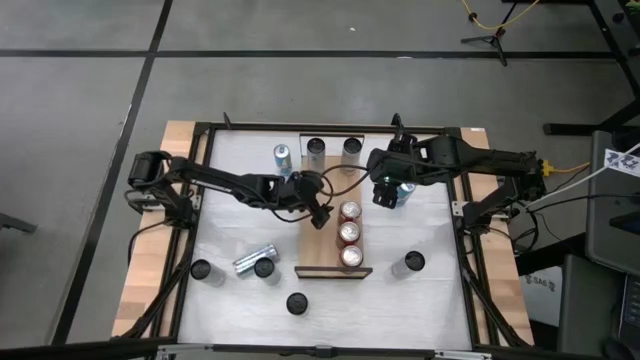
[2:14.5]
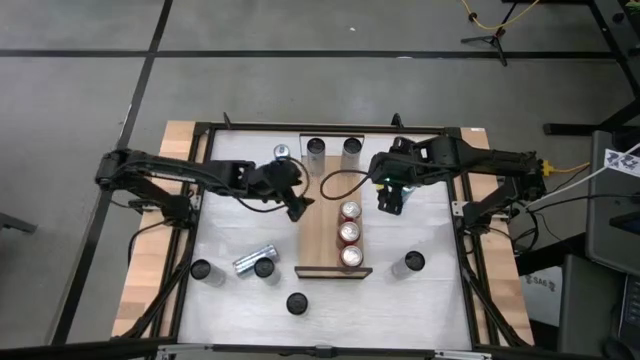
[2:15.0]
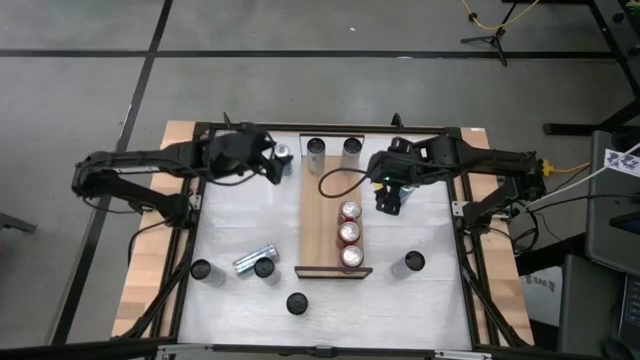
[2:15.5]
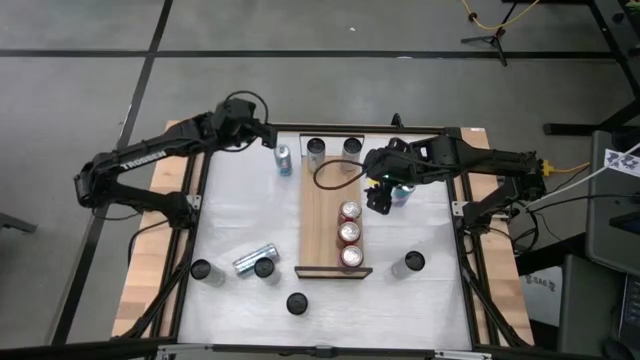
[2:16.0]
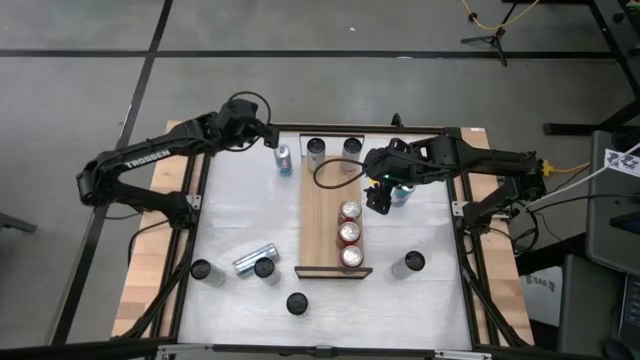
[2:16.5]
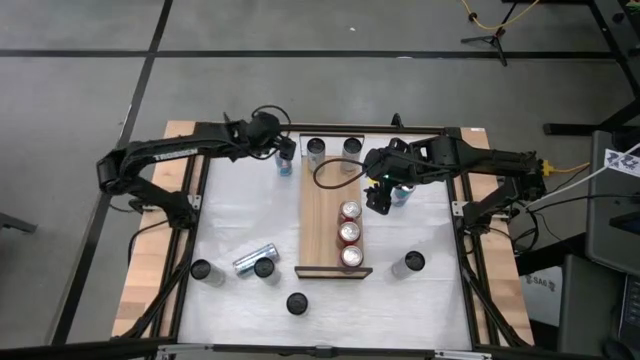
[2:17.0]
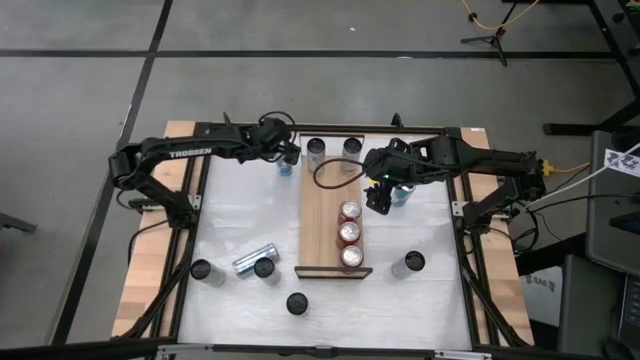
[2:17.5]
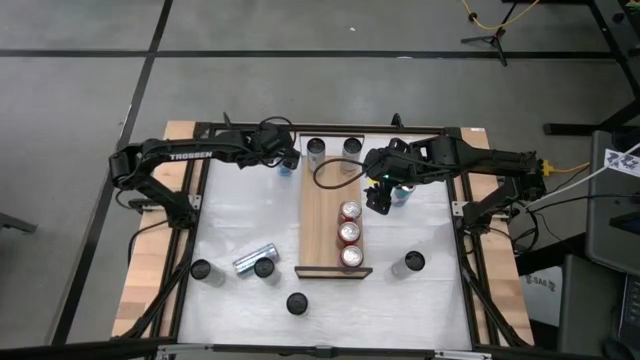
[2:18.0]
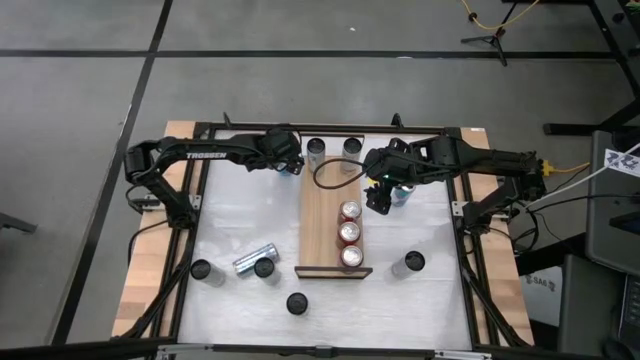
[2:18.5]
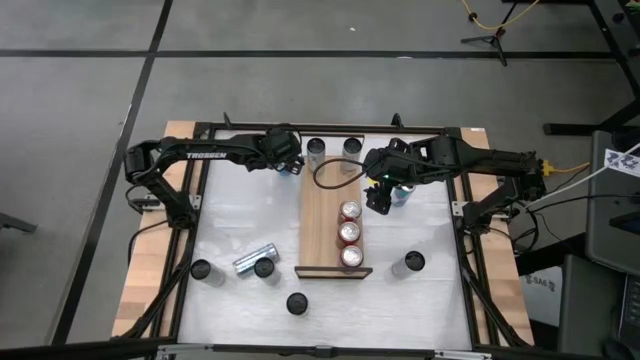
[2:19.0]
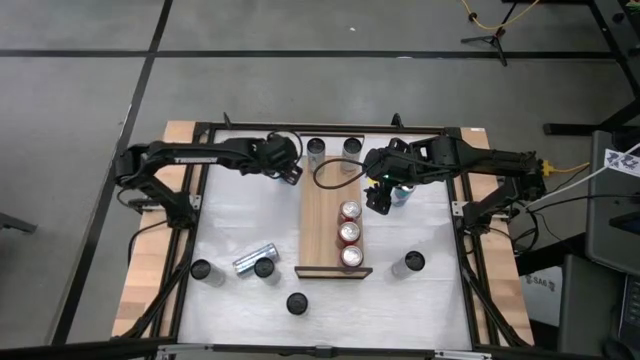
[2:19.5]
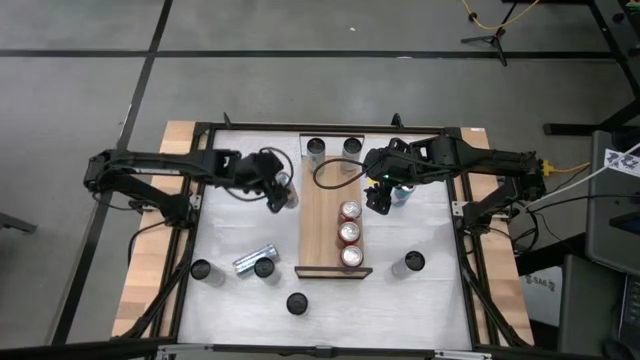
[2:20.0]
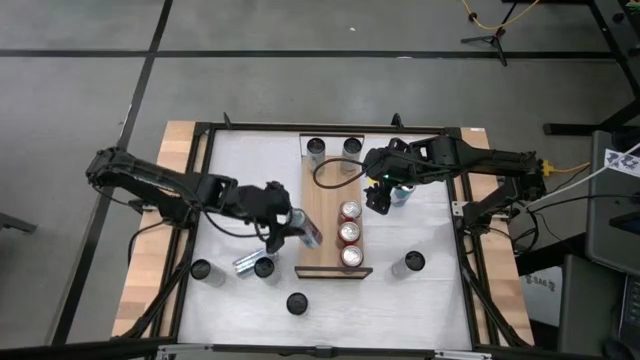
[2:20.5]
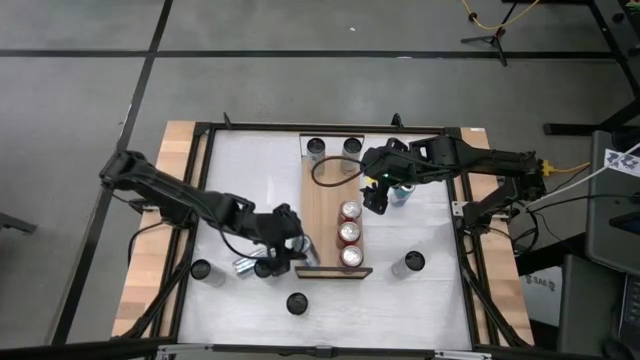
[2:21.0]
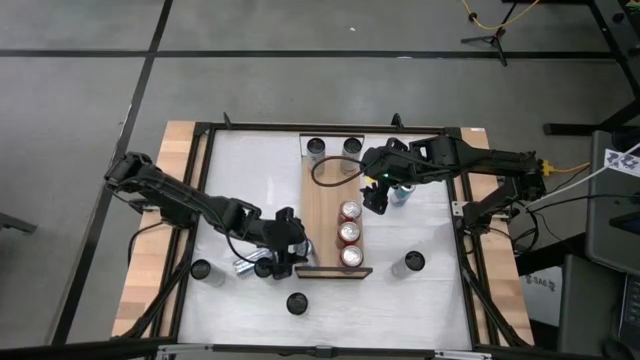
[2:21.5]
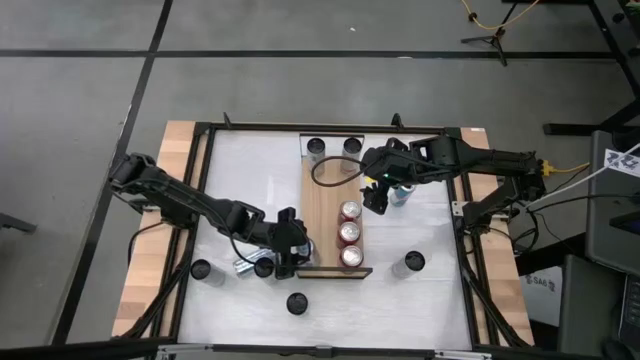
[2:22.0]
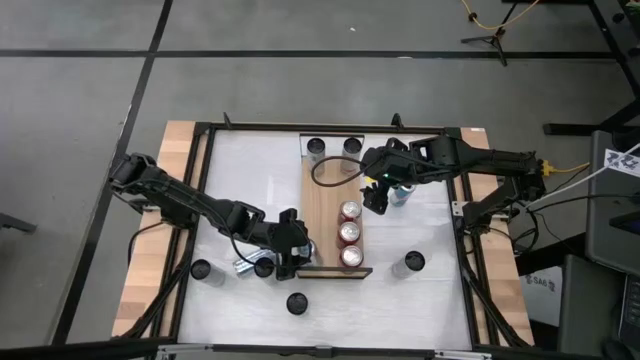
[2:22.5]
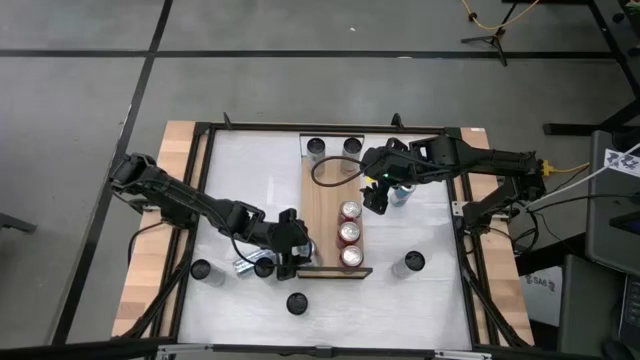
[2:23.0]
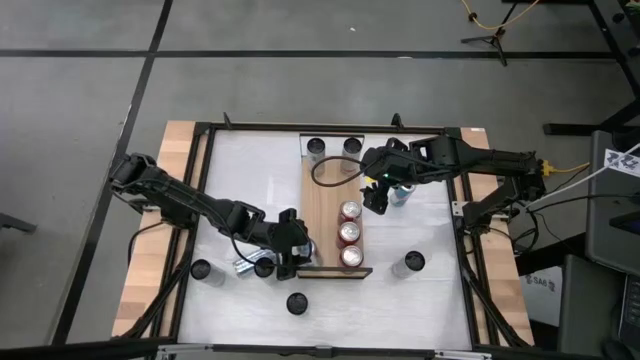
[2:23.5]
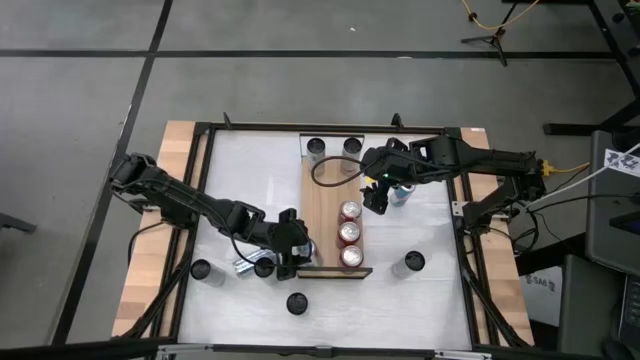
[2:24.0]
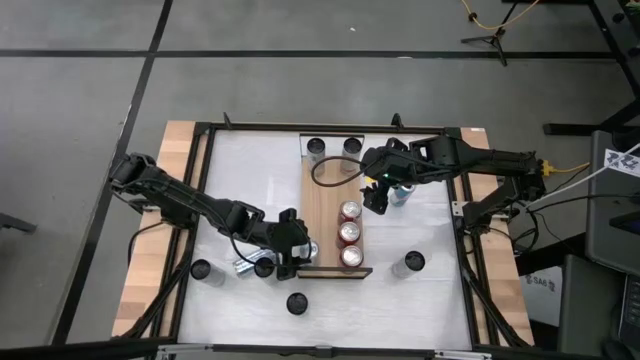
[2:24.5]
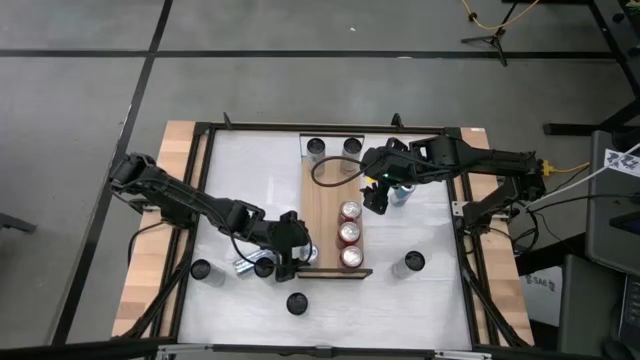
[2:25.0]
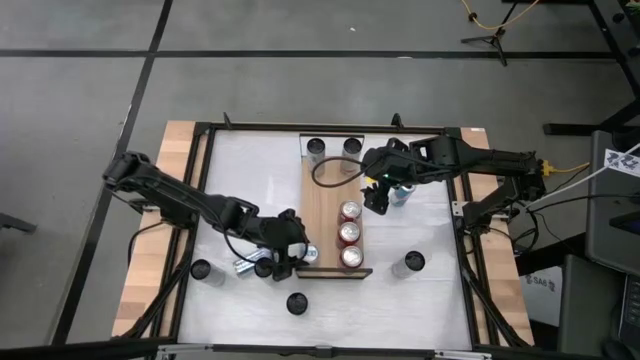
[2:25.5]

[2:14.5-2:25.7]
Task: Place canned beverage on shelf
Put the blue soda can on the shelf

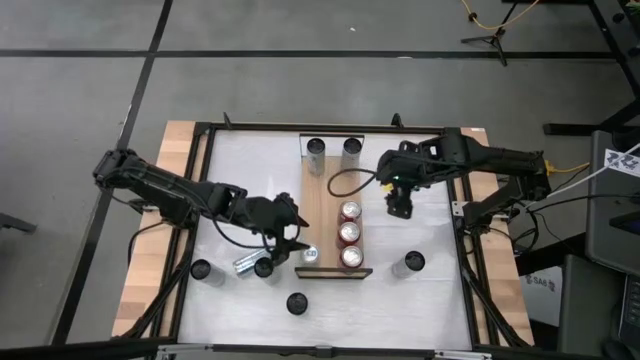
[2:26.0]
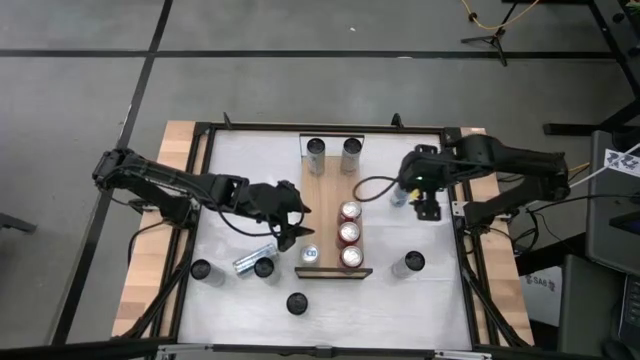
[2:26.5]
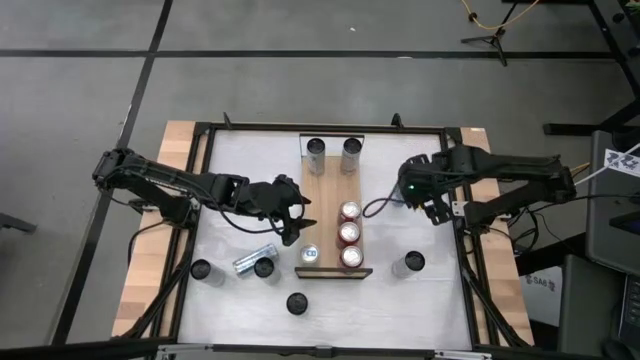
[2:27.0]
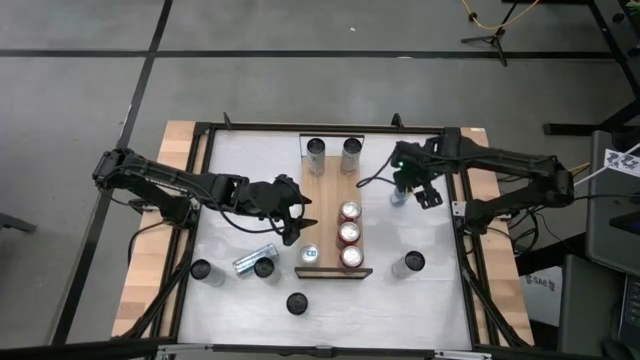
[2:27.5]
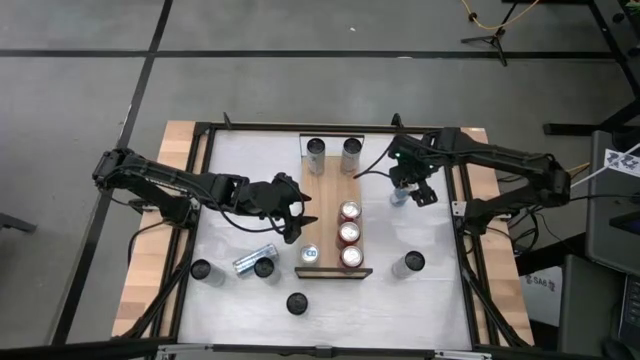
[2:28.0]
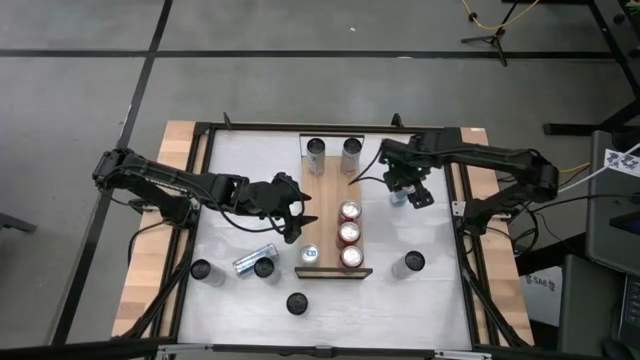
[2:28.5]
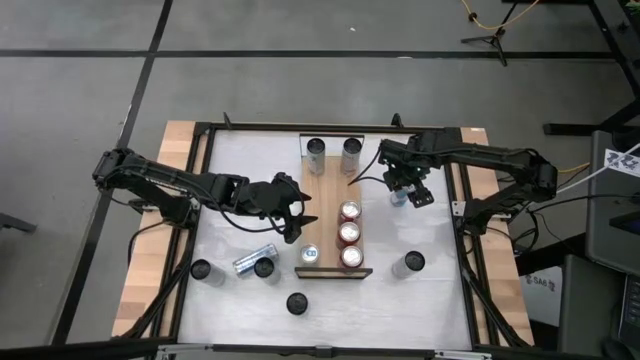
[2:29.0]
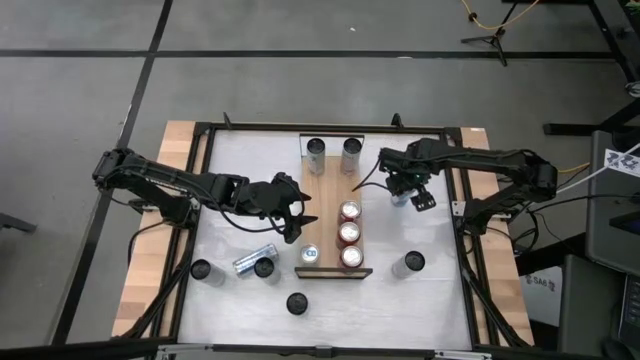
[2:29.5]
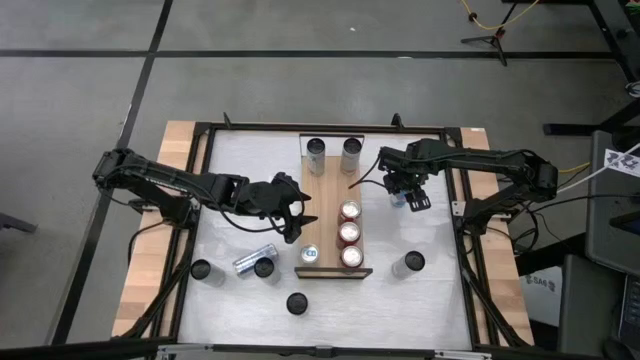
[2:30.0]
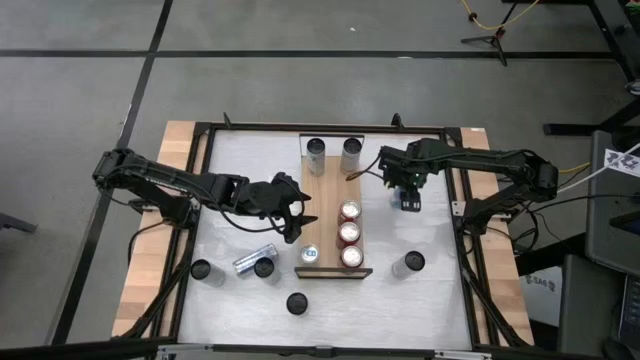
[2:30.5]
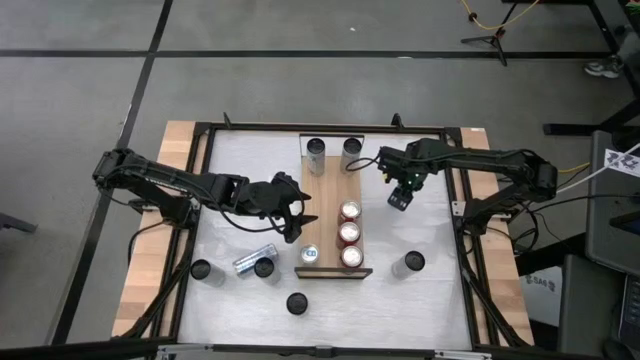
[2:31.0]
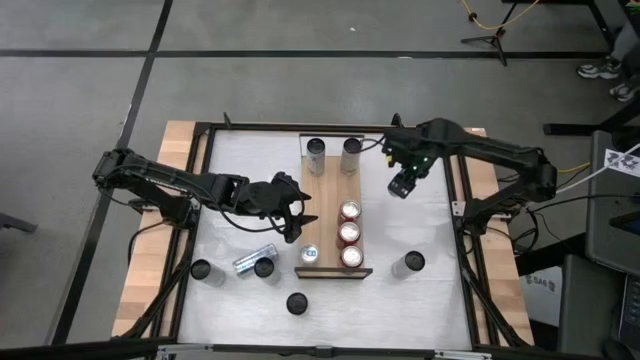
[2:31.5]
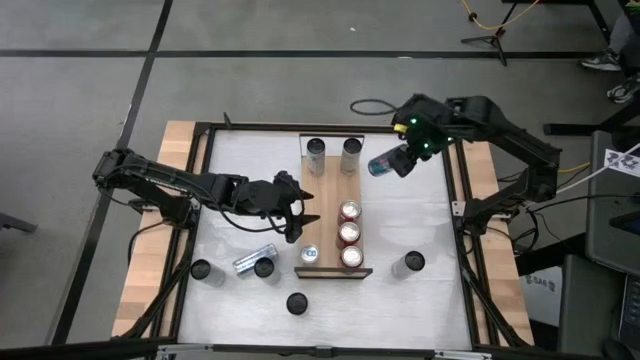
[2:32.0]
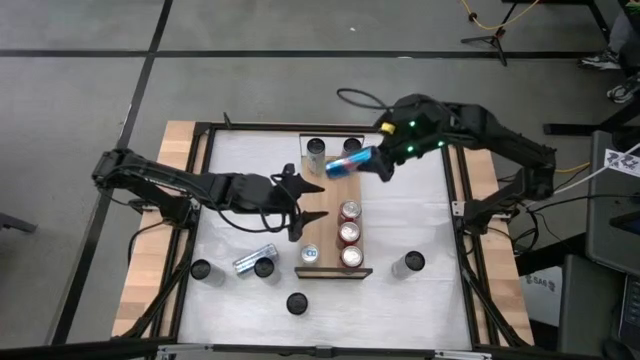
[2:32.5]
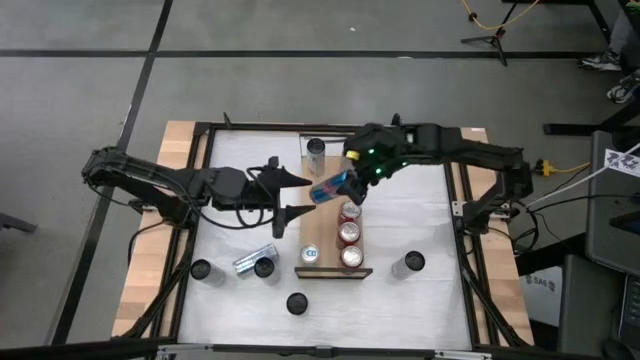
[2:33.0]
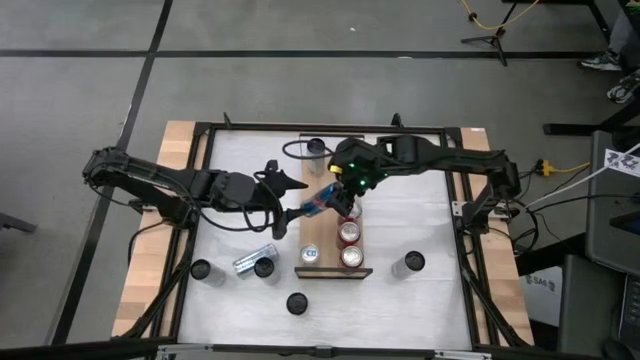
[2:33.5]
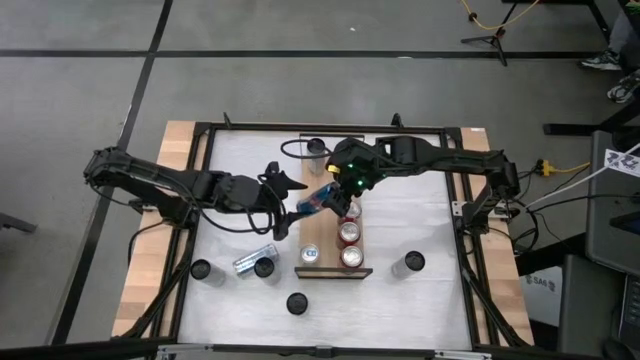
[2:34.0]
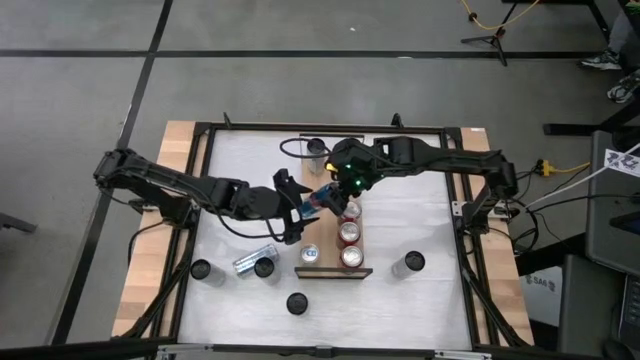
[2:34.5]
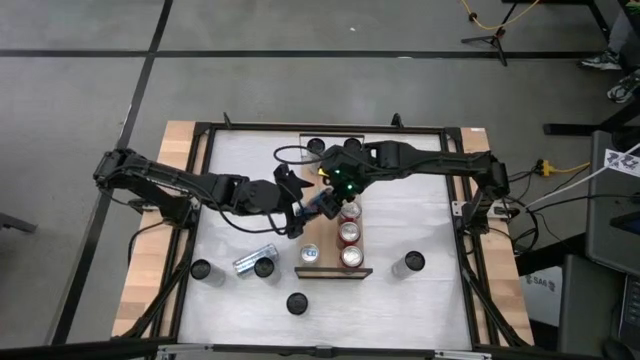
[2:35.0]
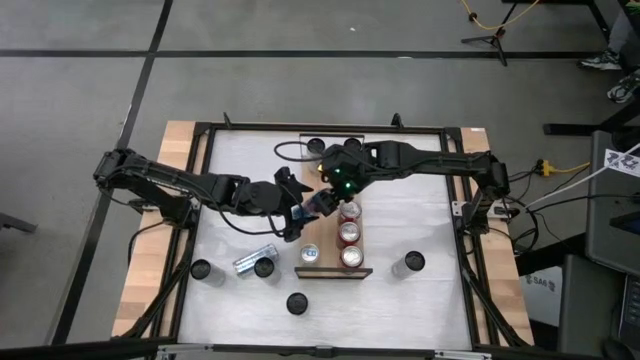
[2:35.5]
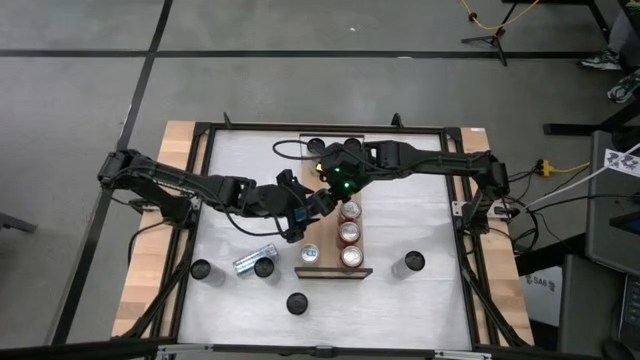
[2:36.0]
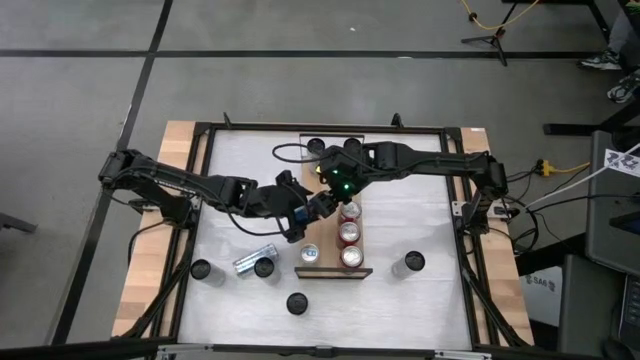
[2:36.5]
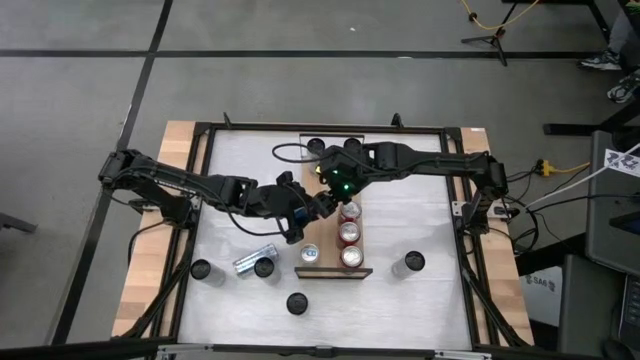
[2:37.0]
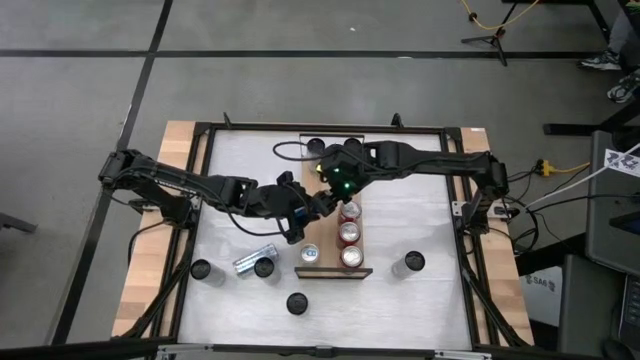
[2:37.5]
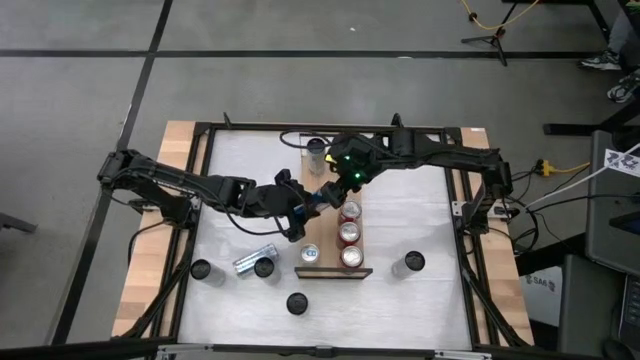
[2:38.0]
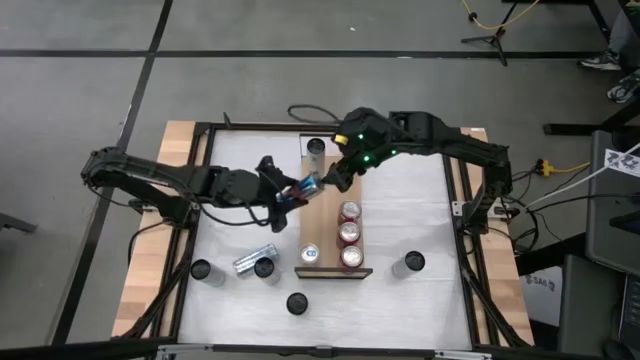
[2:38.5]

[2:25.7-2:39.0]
Put the blue soda can on the shelf aligned with the other blue soda can
